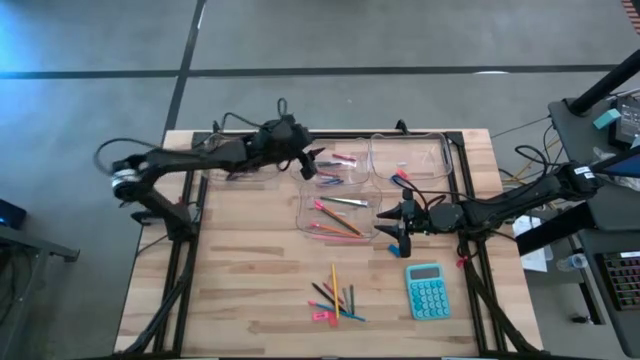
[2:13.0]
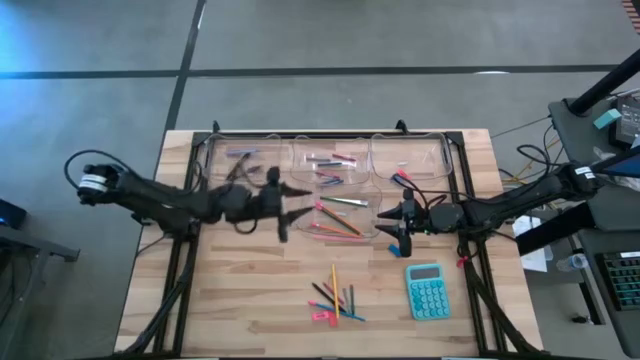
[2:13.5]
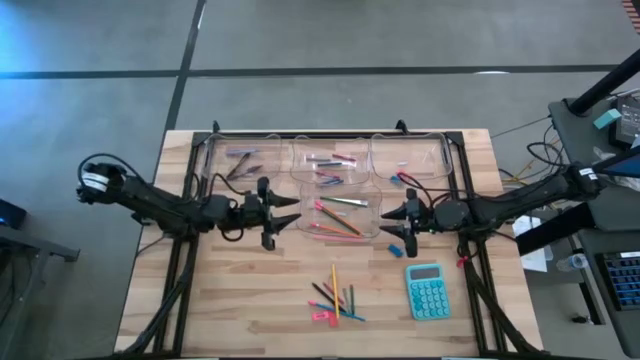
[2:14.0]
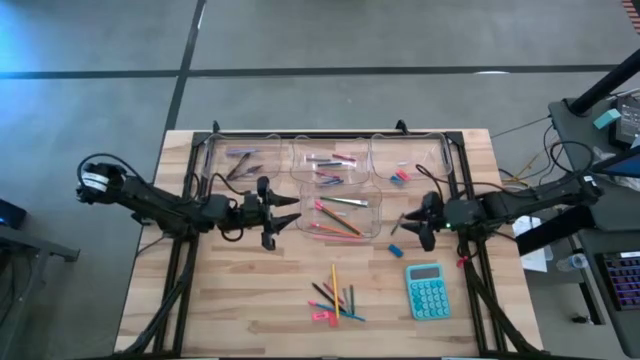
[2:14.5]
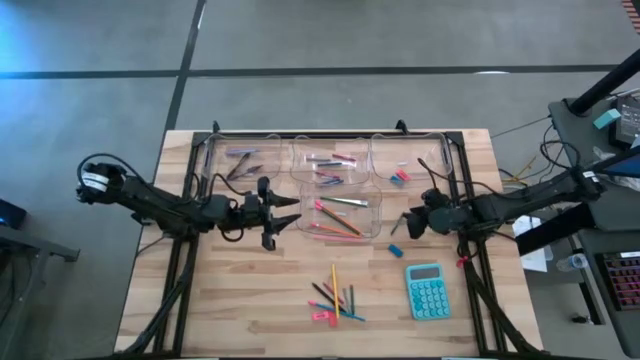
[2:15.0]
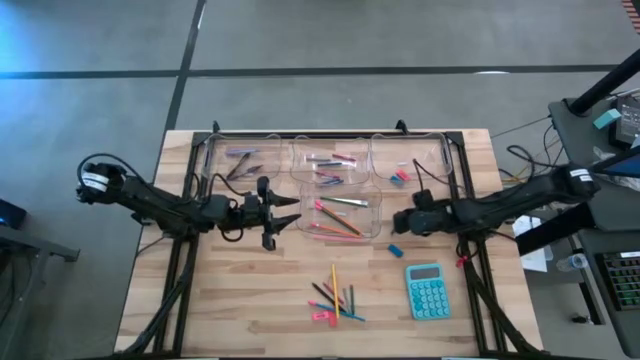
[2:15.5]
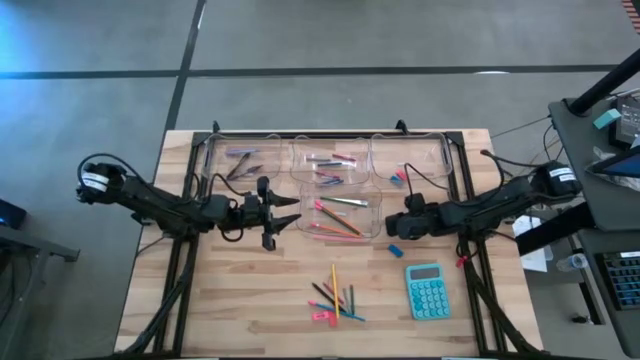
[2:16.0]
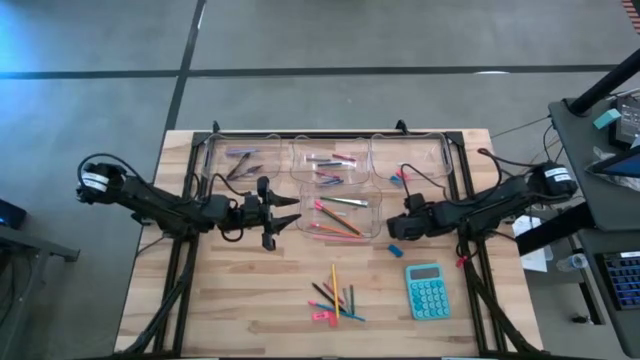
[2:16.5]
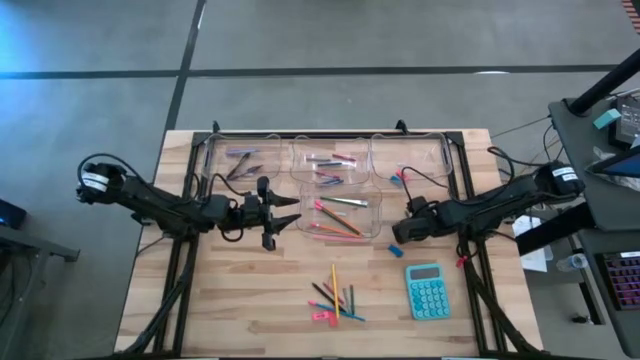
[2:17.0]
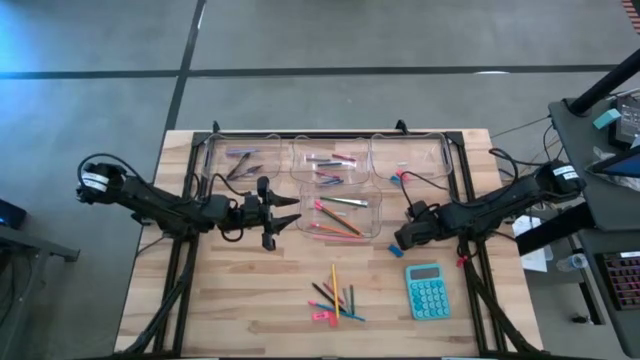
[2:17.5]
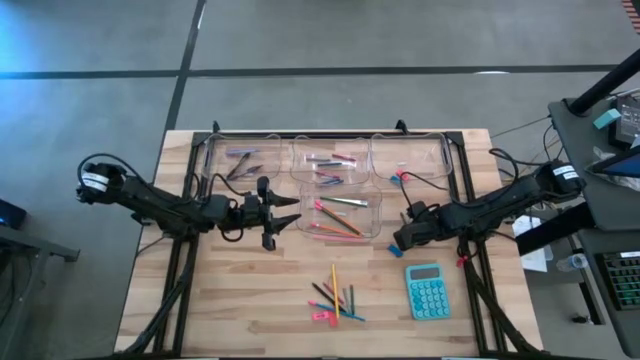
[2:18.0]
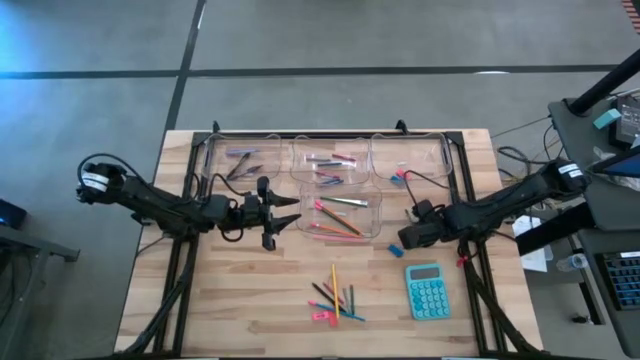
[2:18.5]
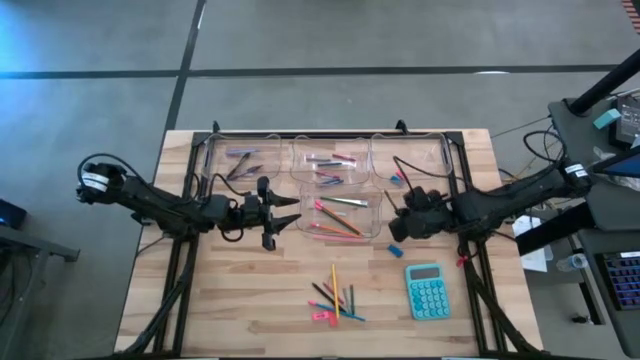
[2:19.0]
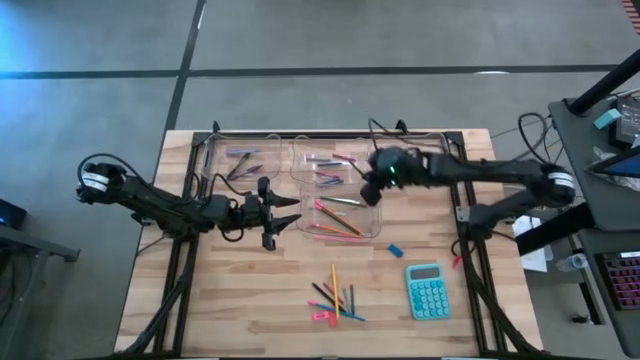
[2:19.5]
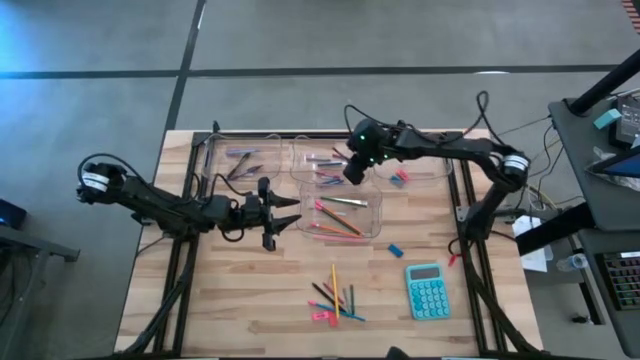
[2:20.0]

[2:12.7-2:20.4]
Task: Sort crayons/erasers/pens/pencils in bins
Put the top green crayon into the top middle transparent bin

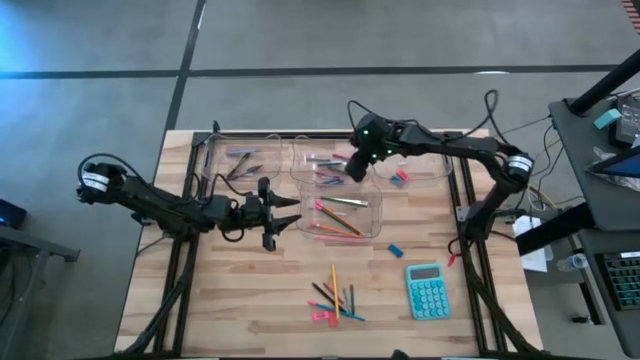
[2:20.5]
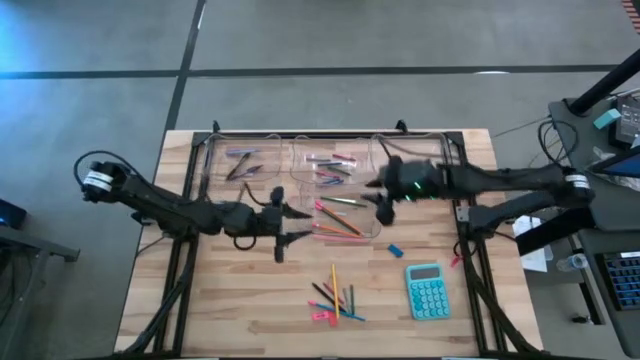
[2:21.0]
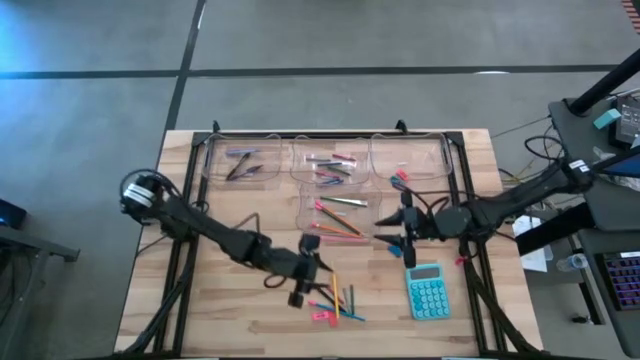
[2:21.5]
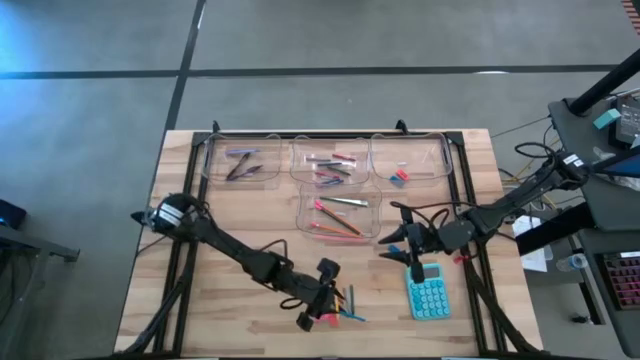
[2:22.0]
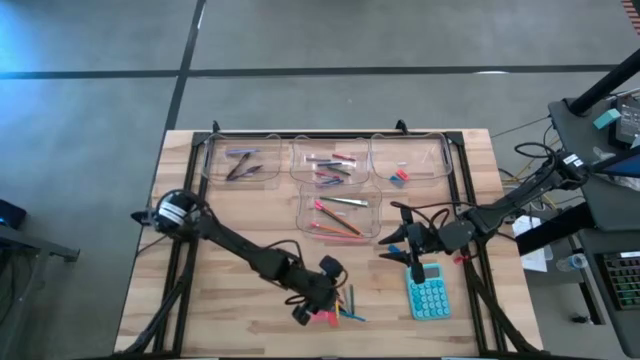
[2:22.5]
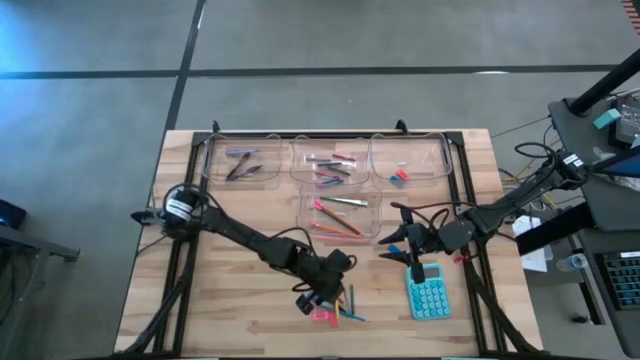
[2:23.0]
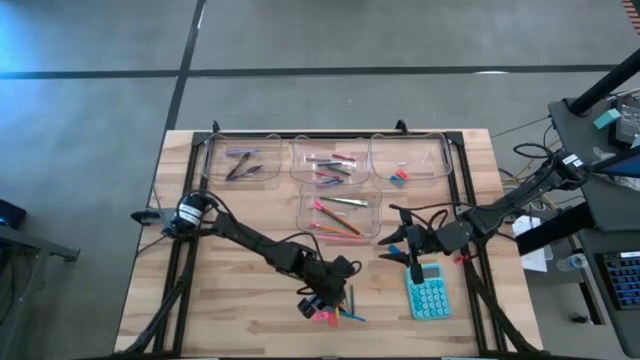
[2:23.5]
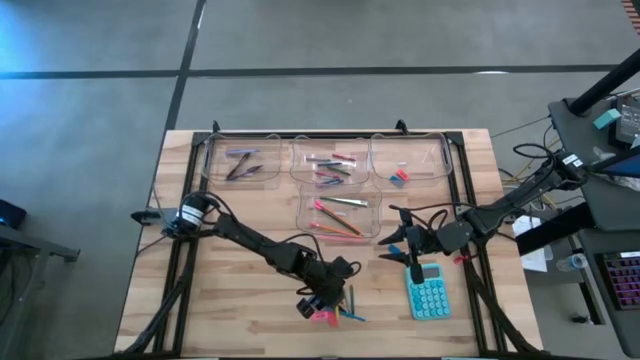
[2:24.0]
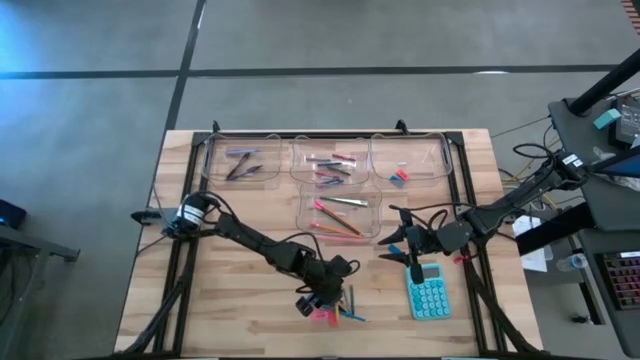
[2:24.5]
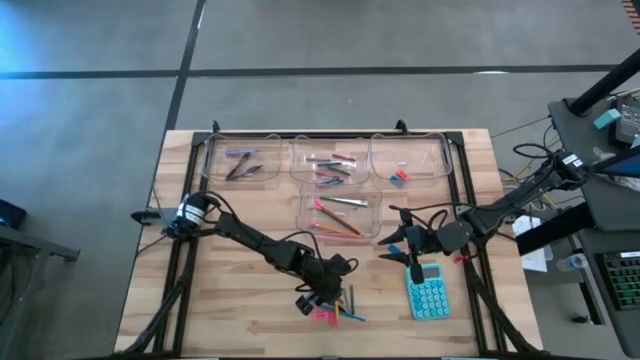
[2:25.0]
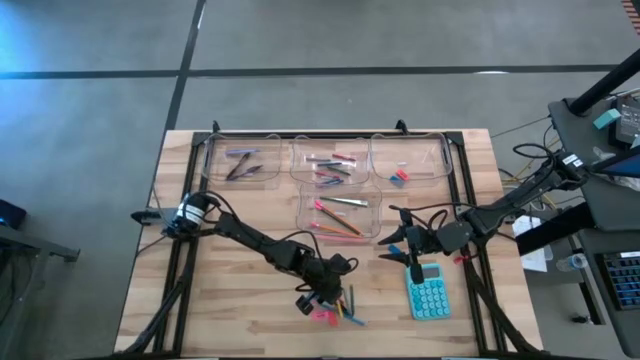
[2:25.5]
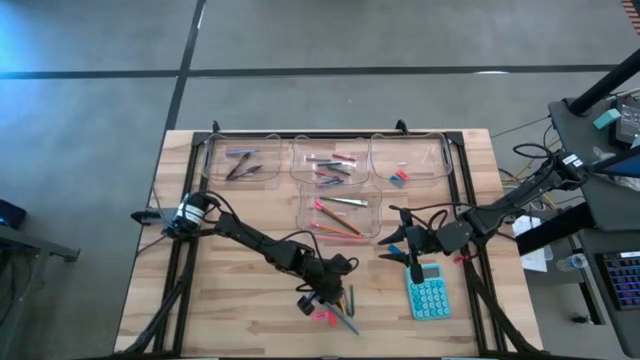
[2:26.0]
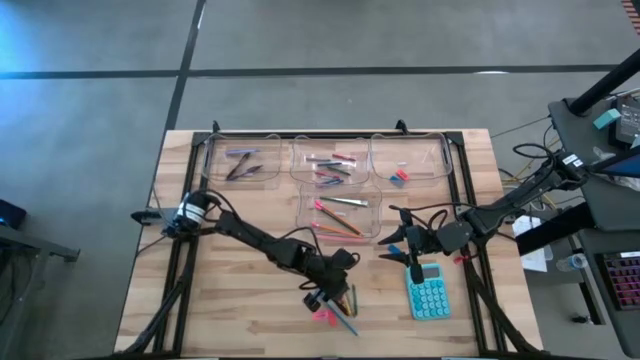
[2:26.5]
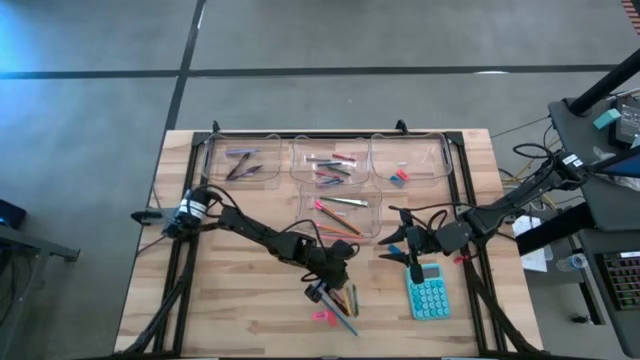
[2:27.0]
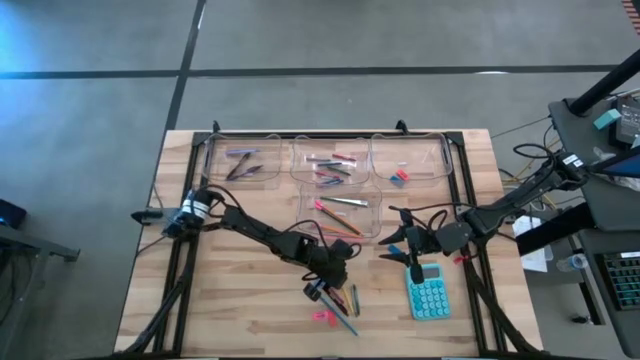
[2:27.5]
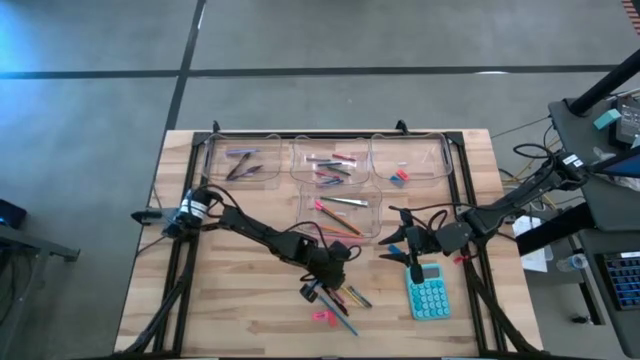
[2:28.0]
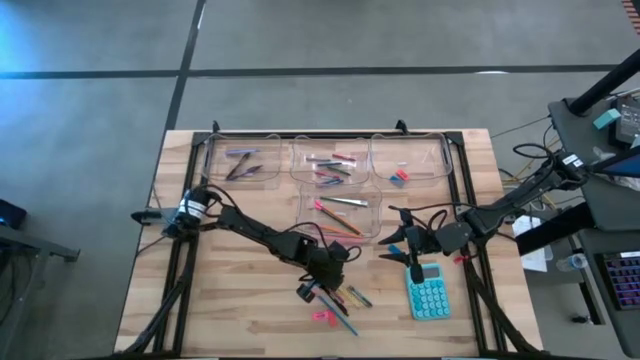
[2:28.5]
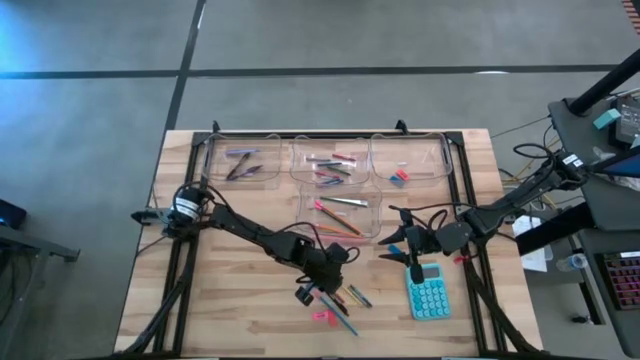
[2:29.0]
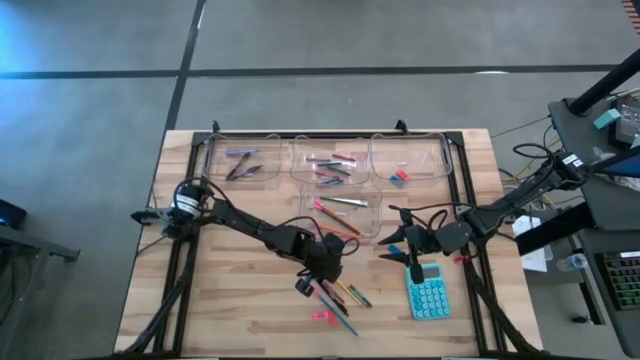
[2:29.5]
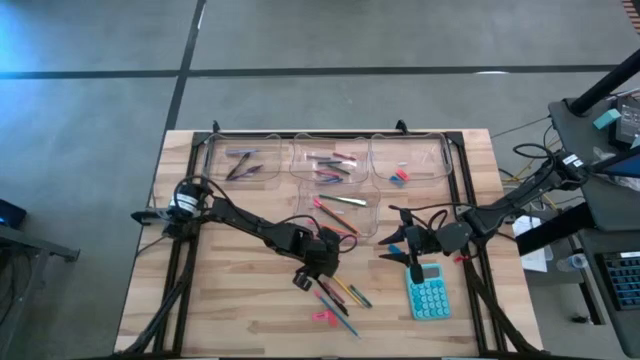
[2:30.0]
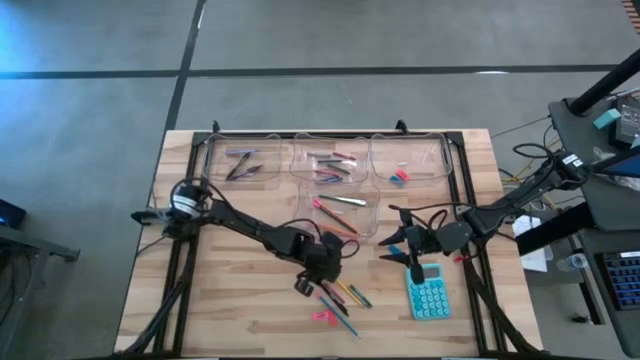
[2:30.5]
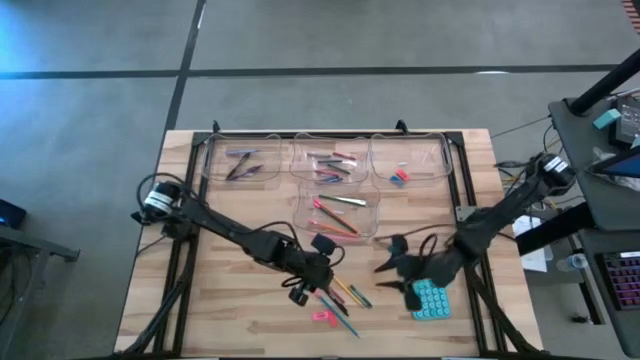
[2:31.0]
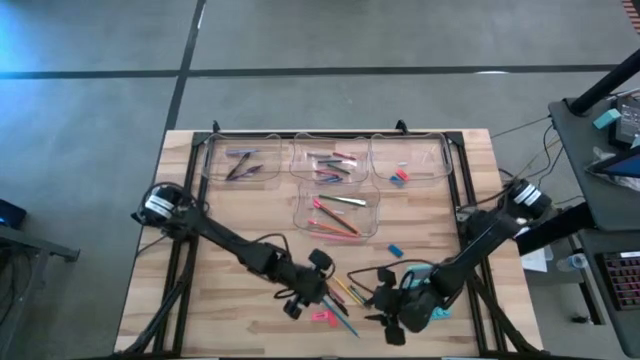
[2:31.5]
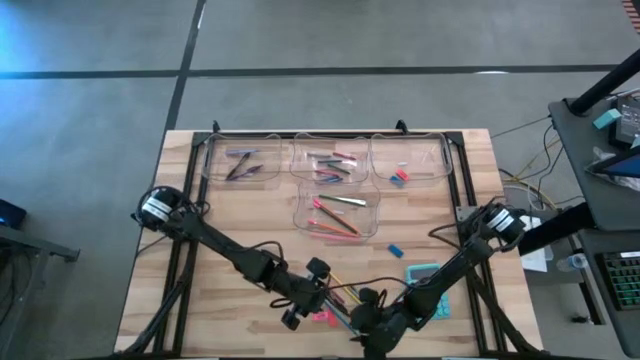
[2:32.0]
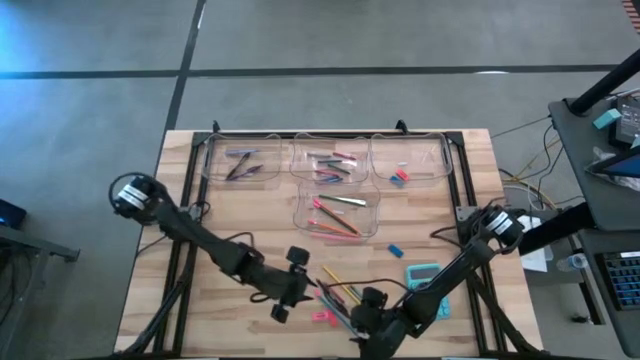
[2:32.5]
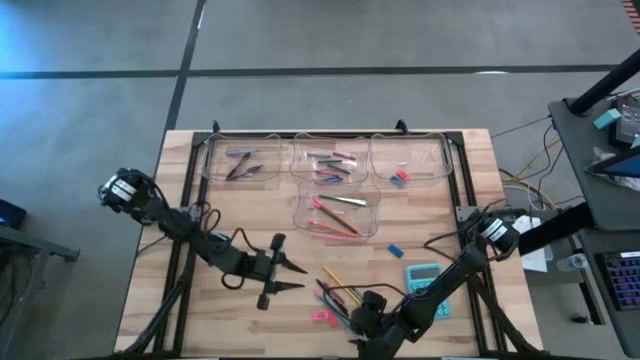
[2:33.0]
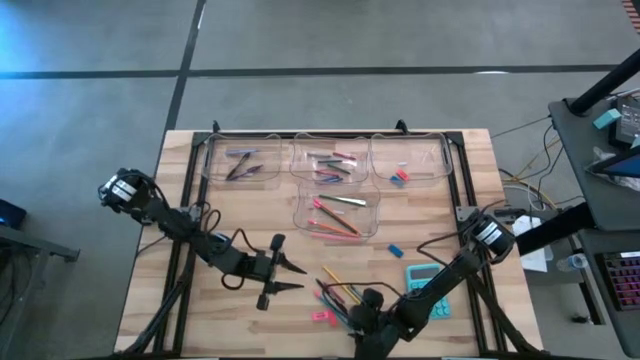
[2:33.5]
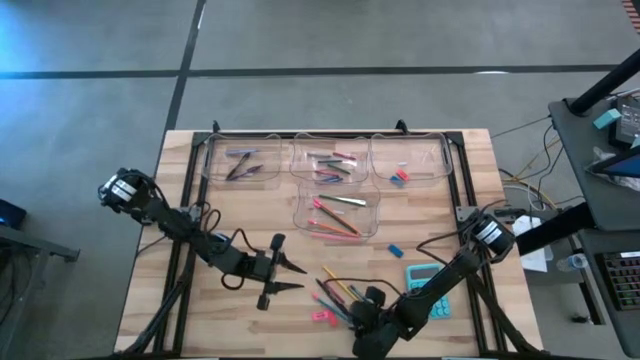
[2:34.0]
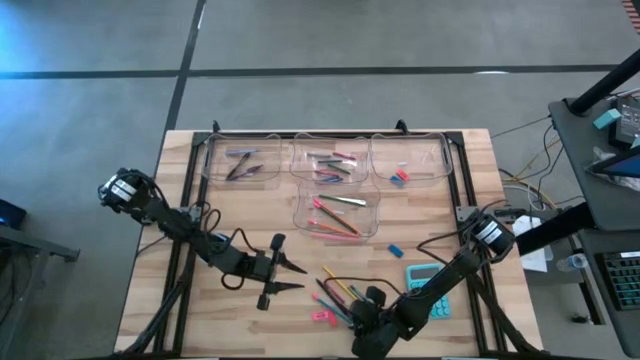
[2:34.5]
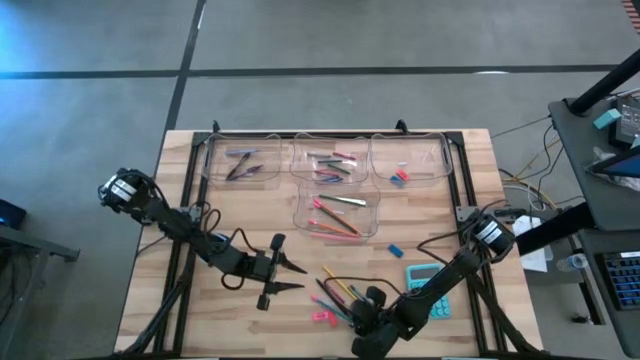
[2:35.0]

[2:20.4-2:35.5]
Put the yellow pencil into the bottom transparent bin
